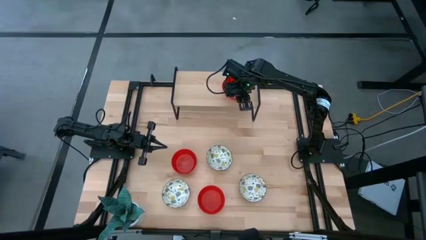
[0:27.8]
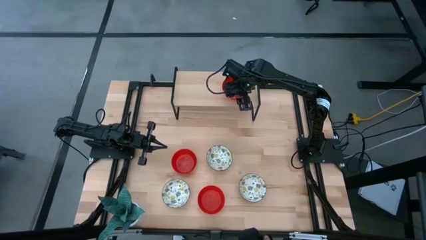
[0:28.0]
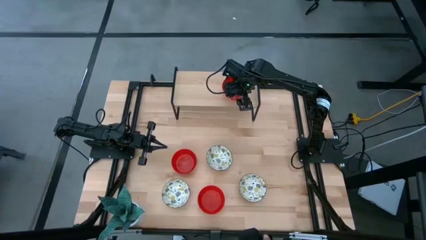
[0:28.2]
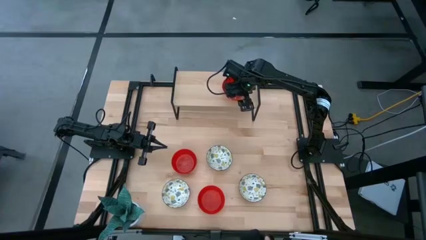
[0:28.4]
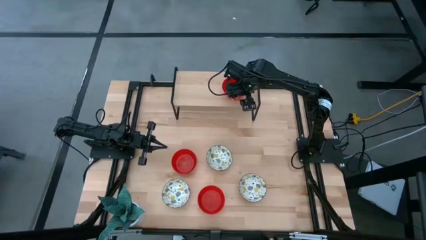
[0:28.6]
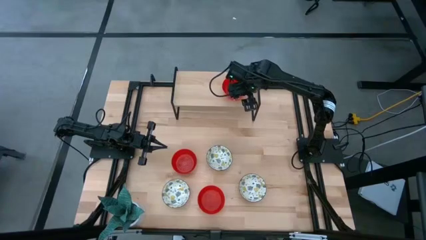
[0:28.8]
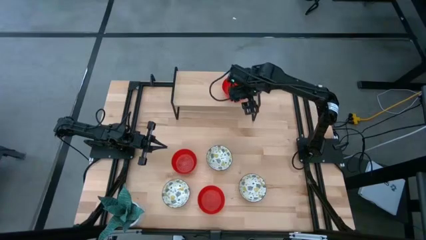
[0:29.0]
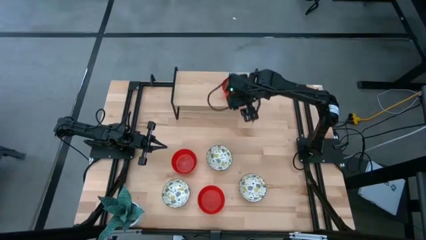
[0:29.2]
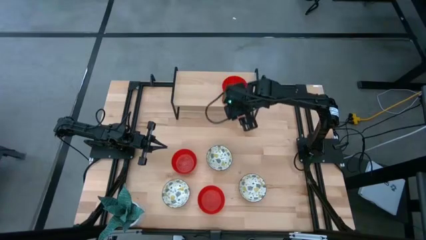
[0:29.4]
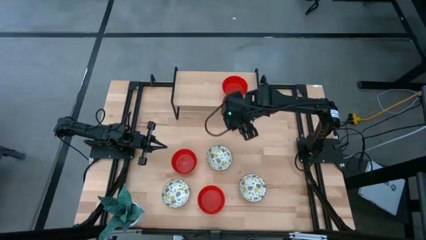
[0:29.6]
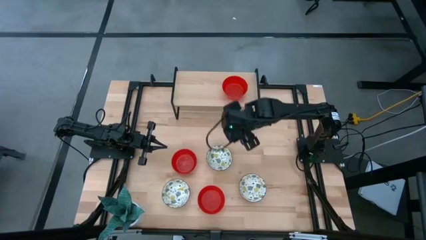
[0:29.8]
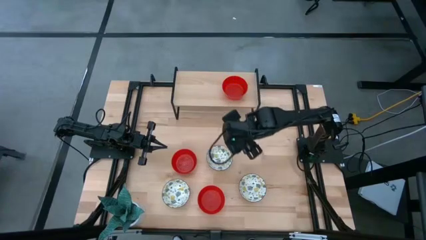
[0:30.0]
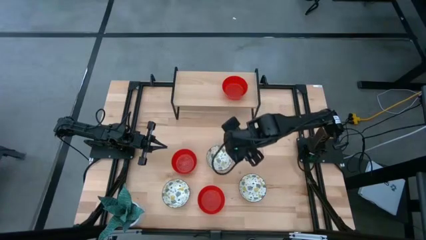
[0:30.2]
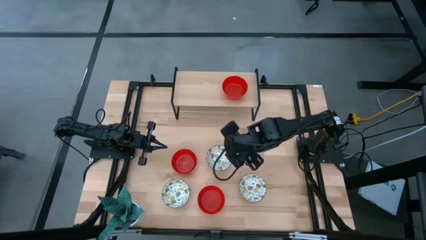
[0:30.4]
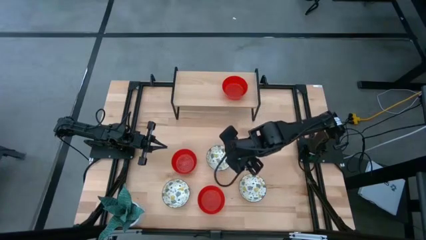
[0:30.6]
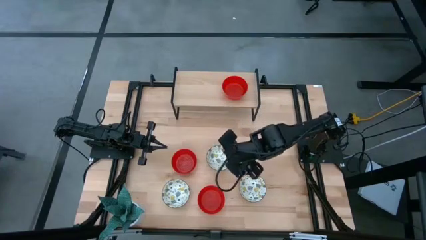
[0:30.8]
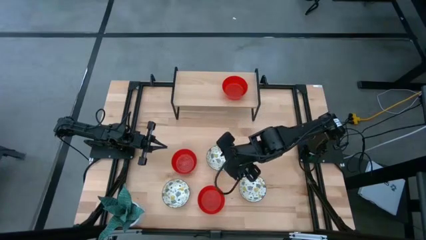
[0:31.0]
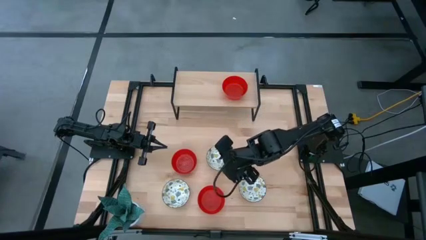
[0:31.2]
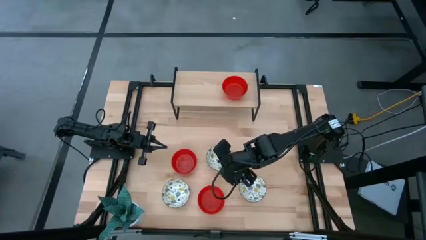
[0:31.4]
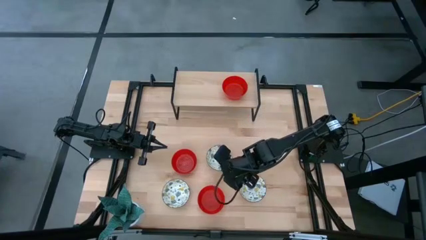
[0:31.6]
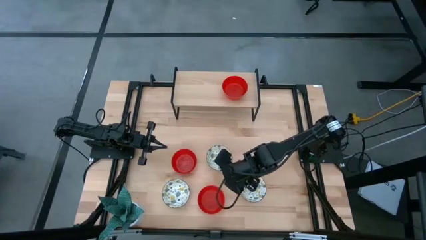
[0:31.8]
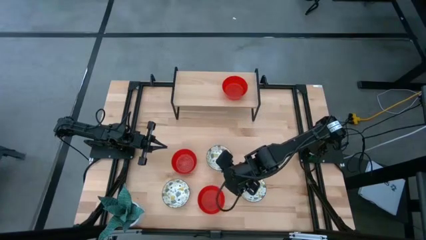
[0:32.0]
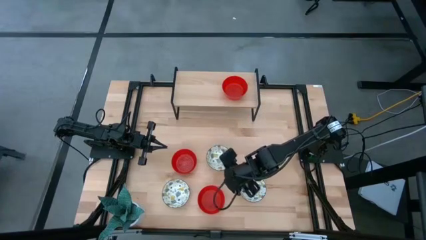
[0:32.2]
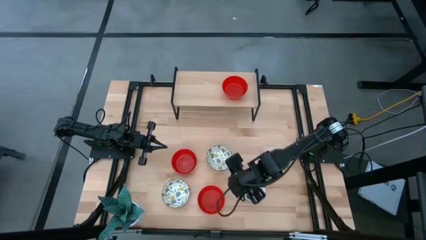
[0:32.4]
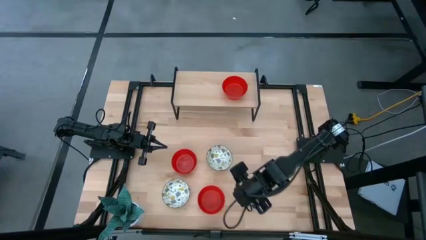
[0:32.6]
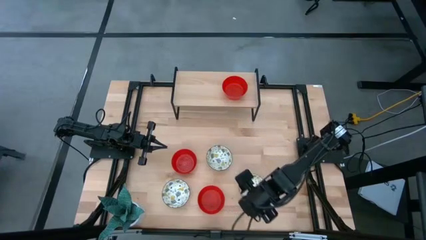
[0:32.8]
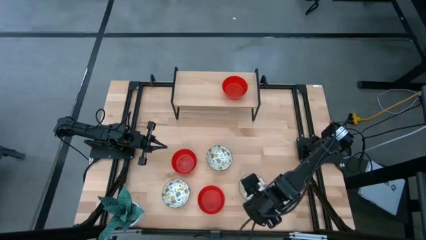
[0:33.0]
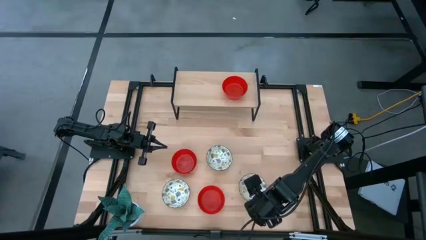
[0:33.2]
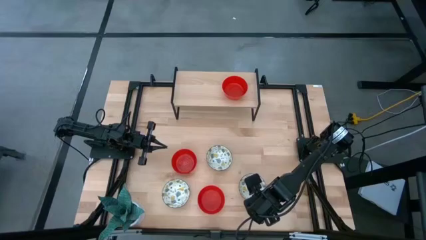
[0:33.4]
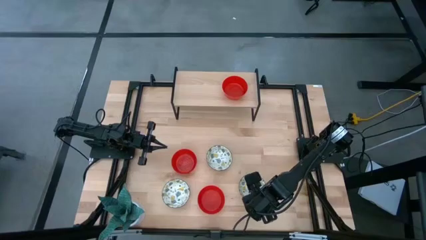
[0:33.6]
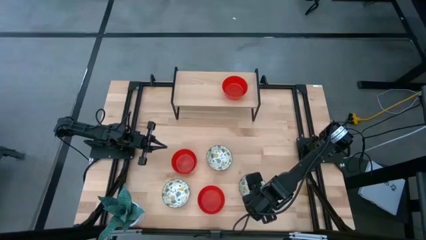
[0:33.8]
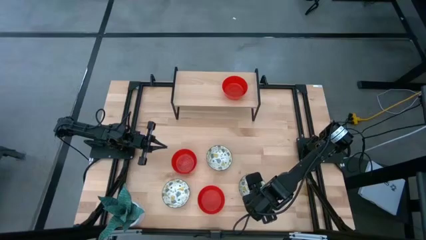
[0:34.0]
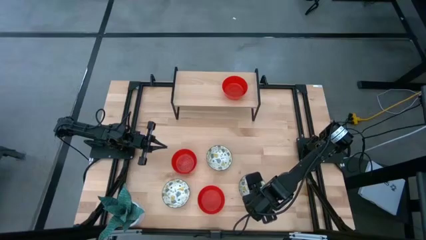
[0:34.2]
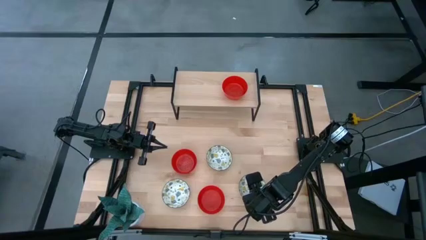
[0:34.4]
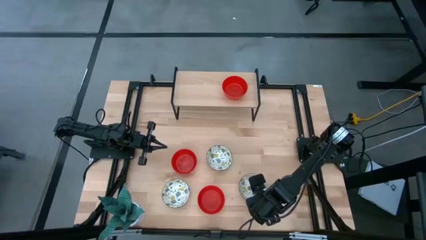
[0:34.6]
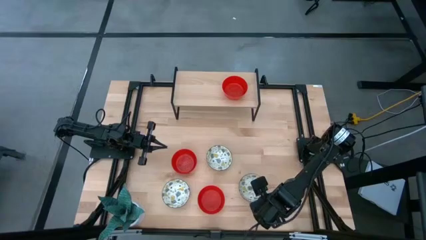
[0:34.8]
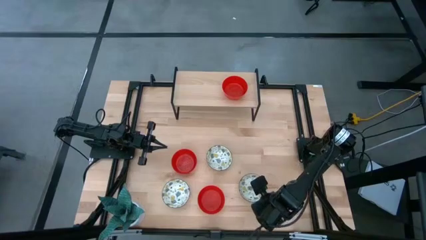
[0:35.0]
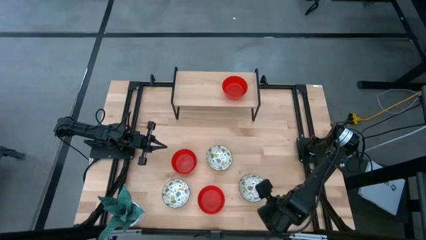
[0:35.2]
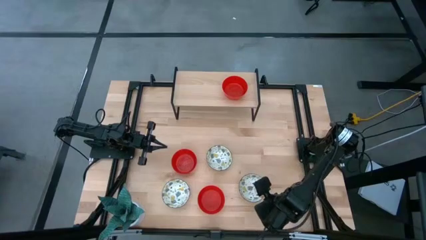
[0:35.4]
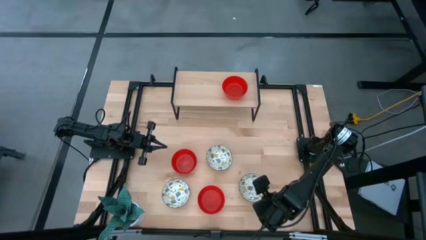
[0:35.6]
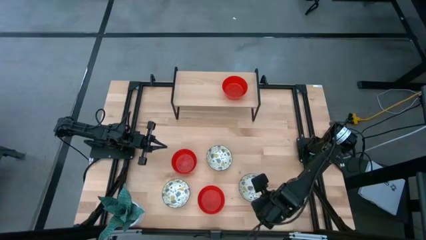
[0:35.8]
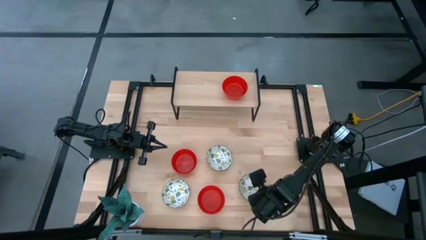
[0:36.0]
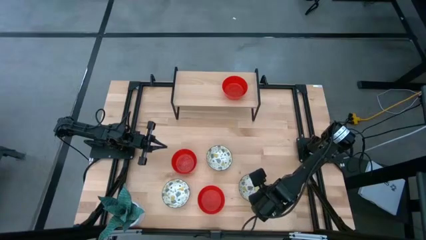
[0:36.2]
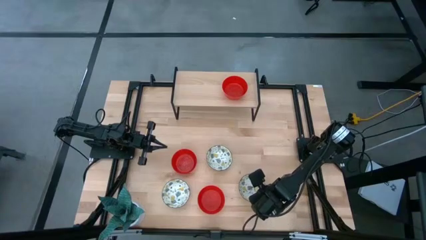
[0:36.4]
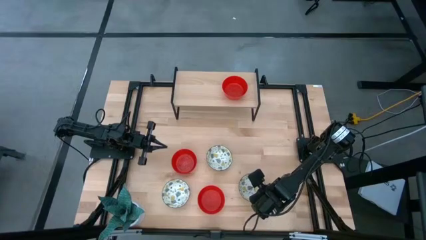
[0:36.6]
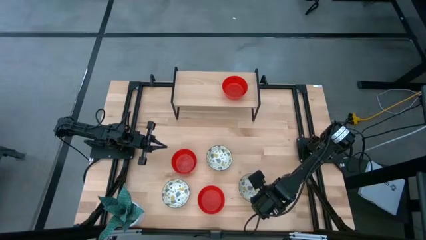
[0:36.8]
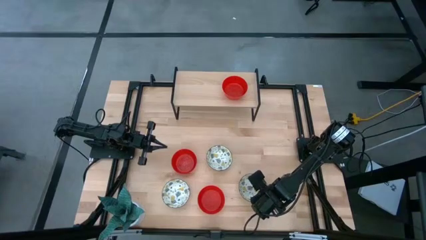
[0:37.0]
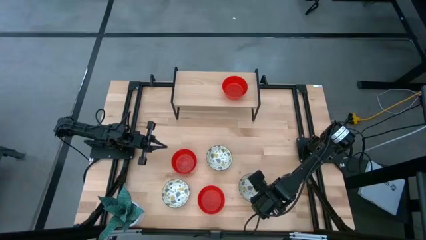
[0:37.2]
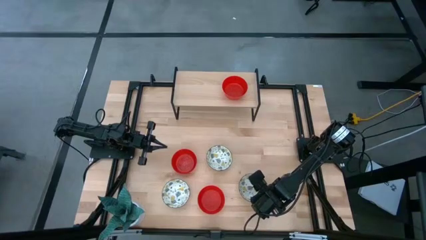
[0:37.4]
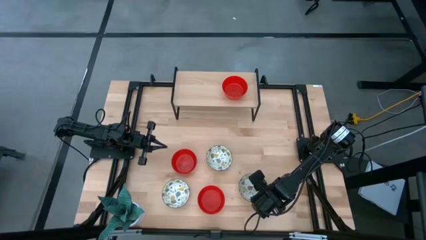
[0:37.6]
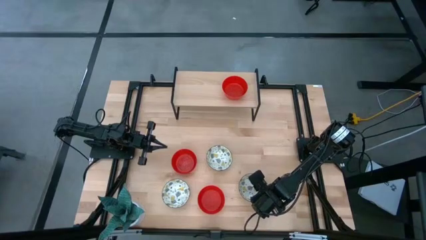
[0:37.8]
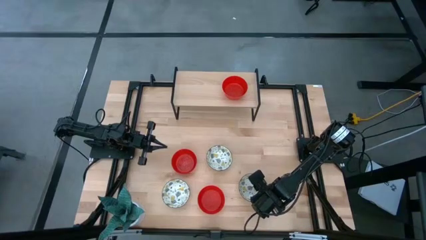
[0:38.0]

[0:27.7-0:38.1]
Task: Pick & Place Mini bowls
Stack the bottom red bowl on top of the red bowl on the shelf
